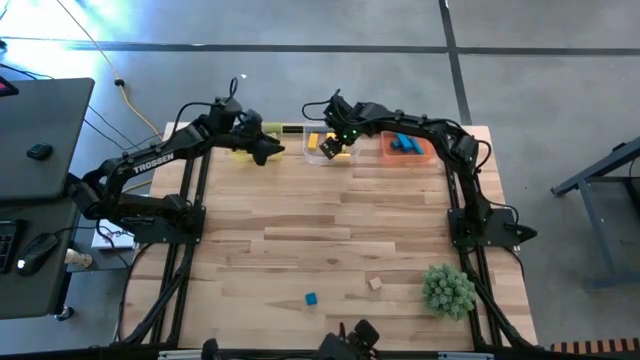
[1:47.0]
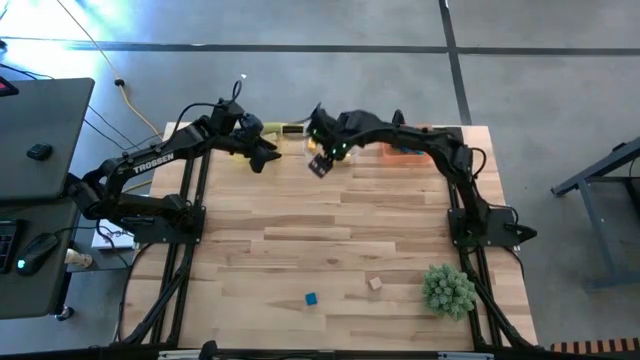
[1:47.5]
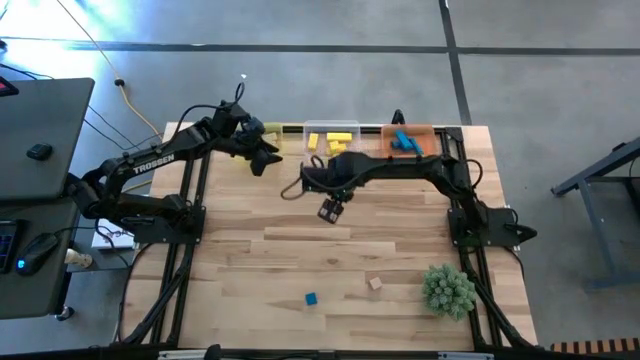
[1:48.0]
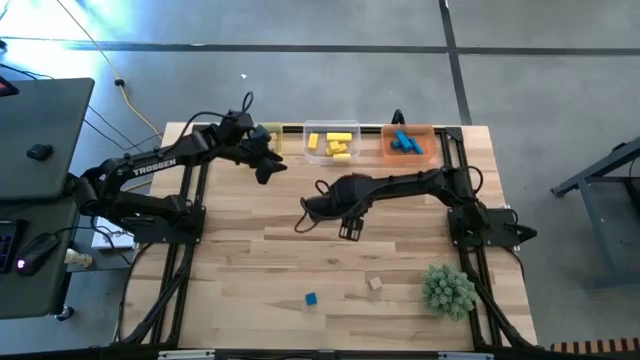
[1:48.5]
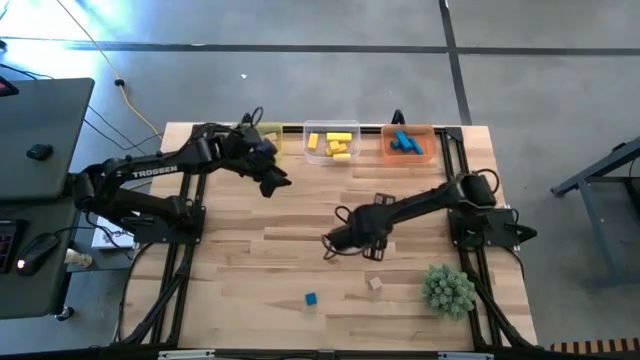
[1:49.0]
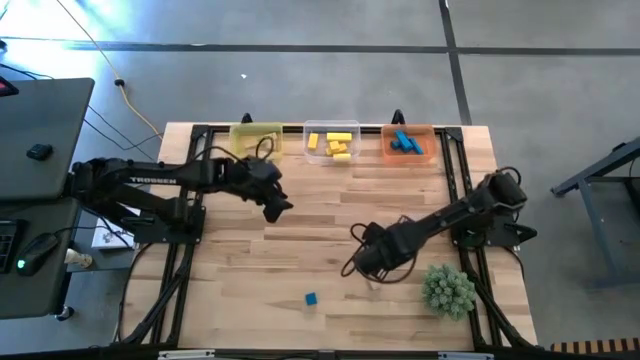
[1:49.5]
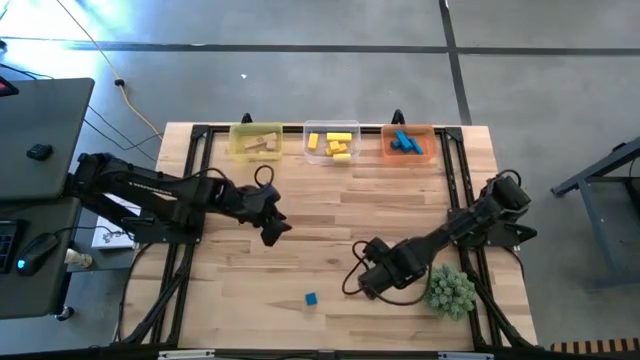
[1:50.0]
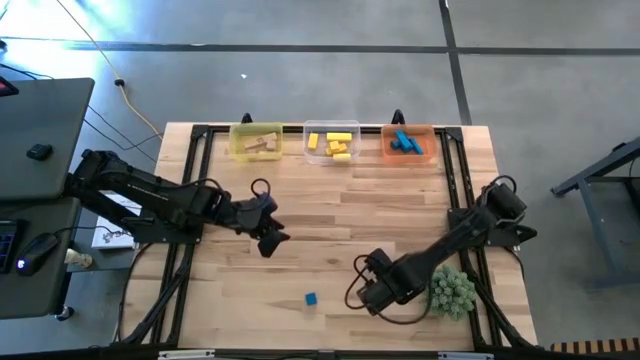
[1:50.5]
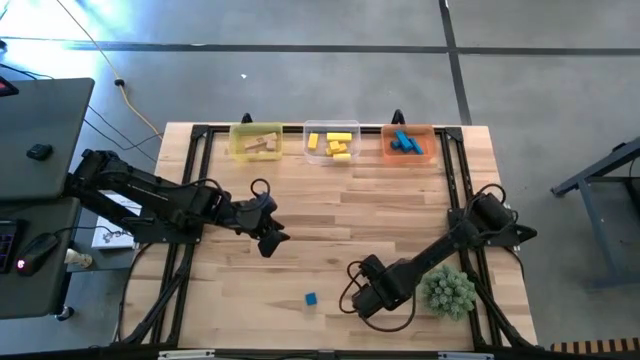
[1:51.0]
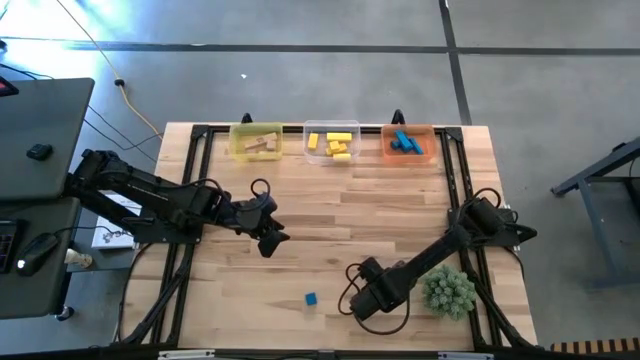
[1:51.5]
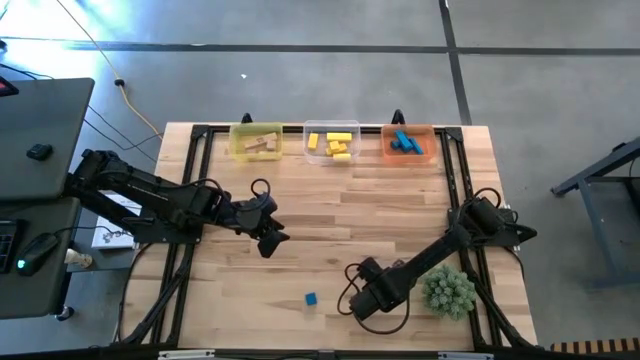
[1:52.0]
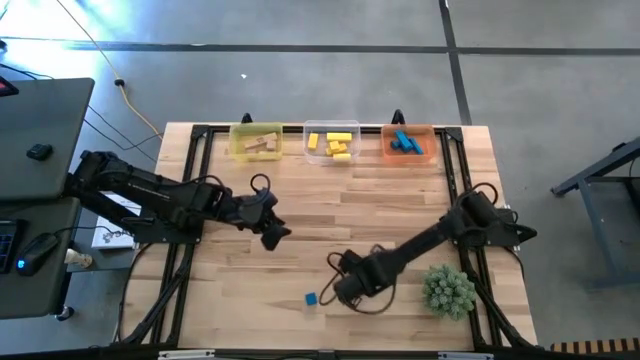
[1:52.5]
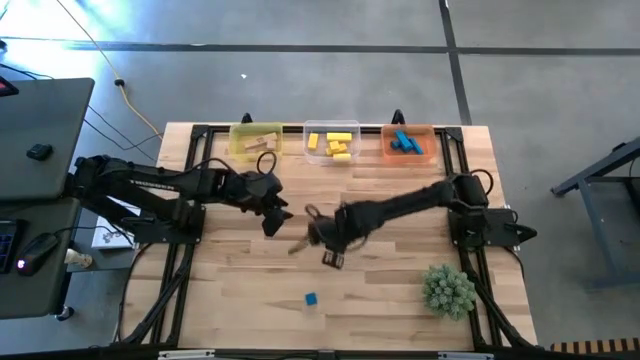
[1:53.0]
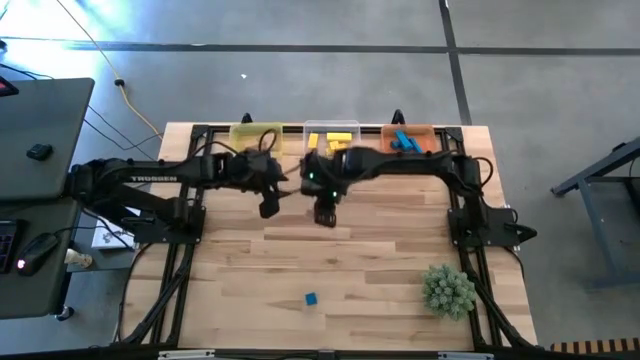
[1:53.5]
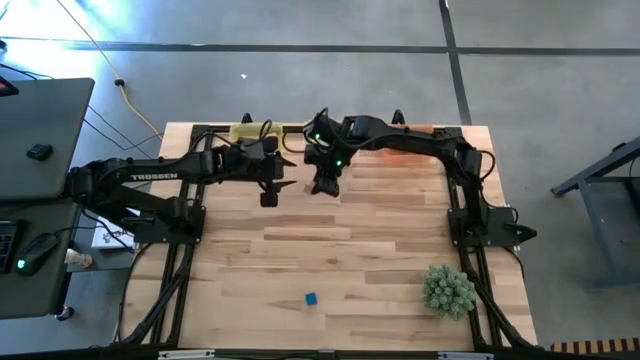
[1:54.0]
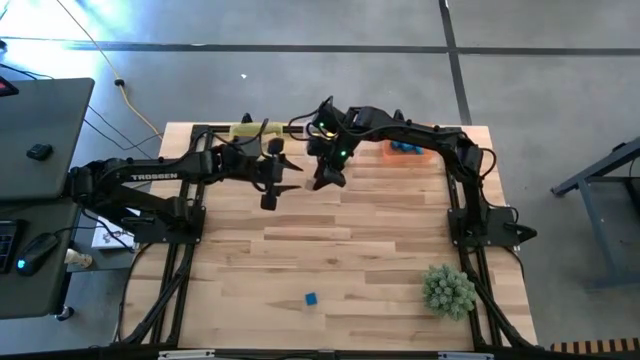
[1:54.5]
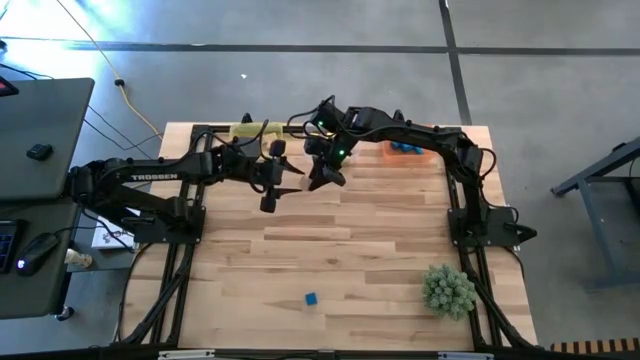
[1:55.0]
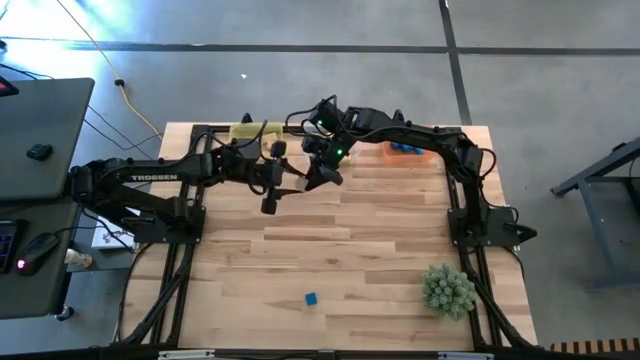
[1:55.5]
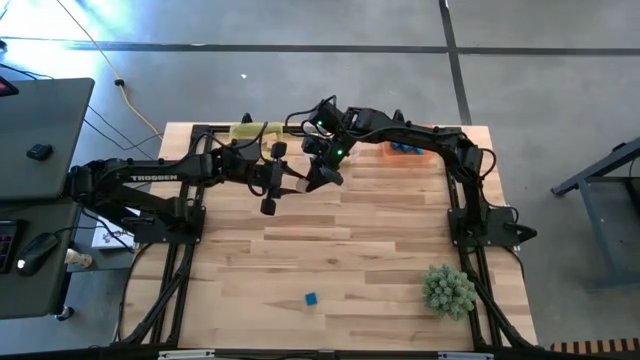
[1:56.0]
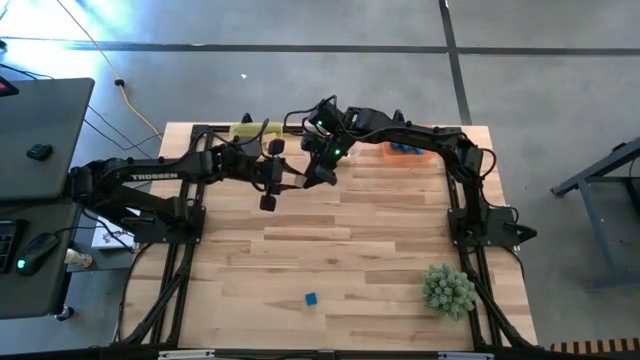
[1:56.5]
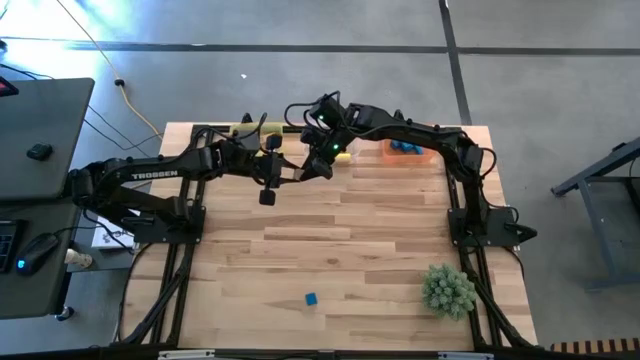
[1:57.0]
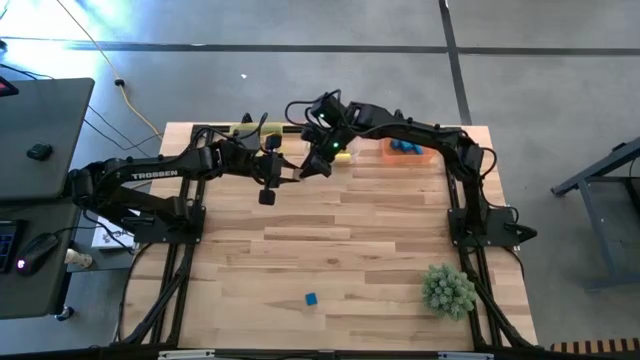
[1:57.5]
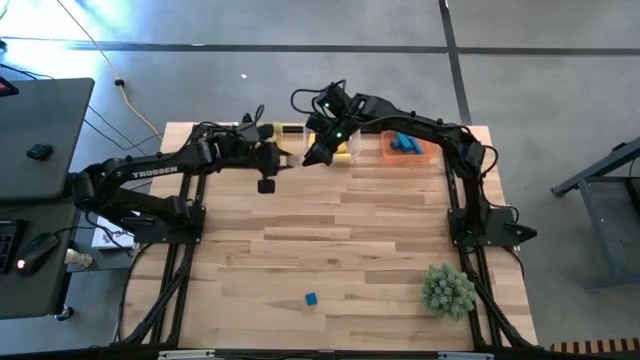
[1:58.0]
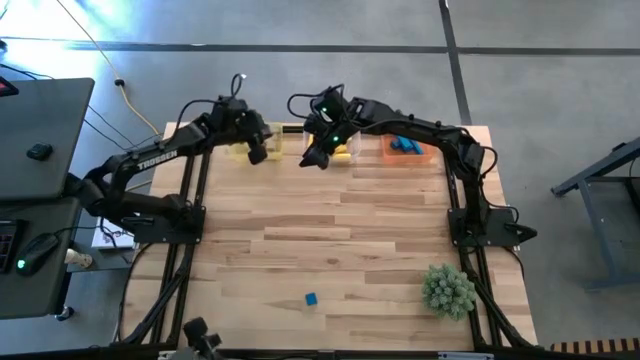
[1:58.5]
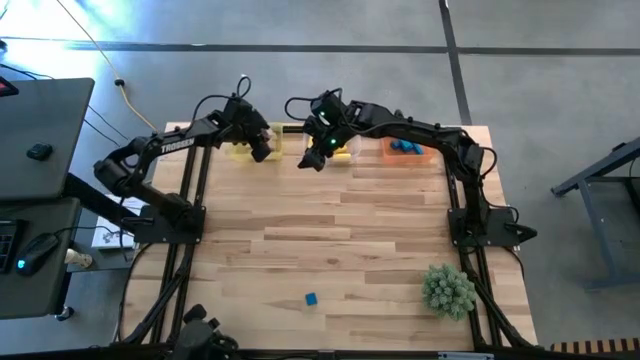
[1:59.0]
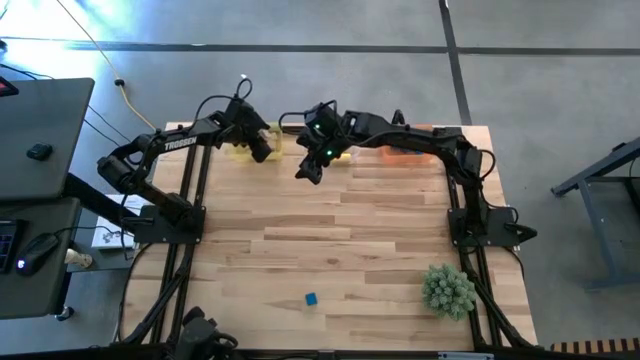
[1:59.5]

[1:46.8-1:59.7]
Task: Sort & place blocks by color
Put the brown block into the yellow bin

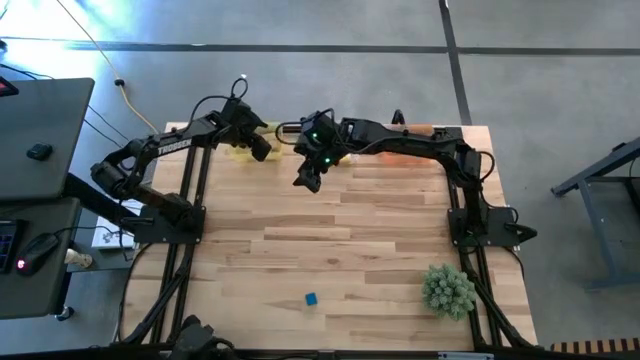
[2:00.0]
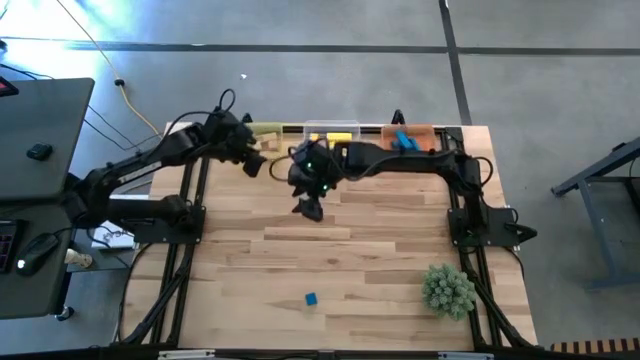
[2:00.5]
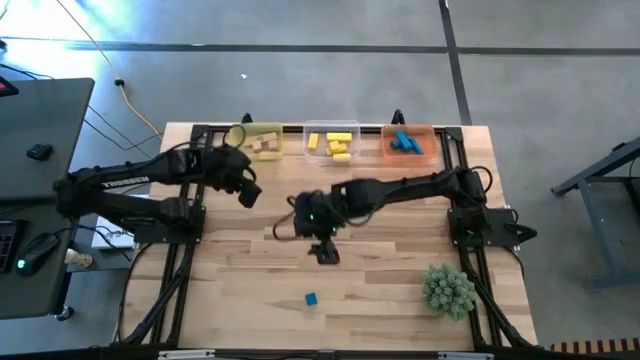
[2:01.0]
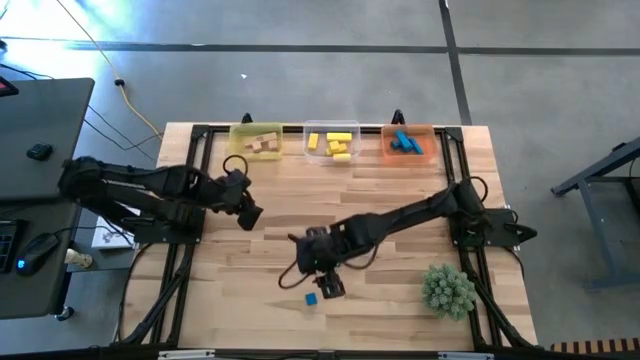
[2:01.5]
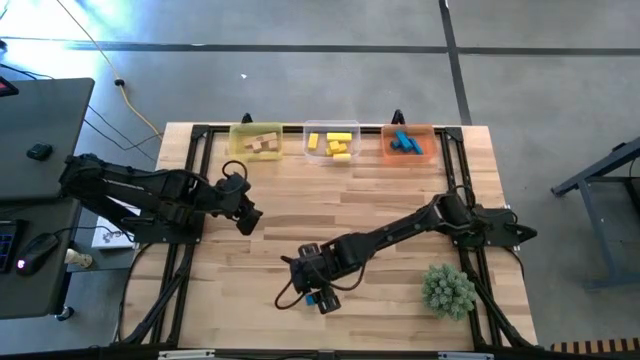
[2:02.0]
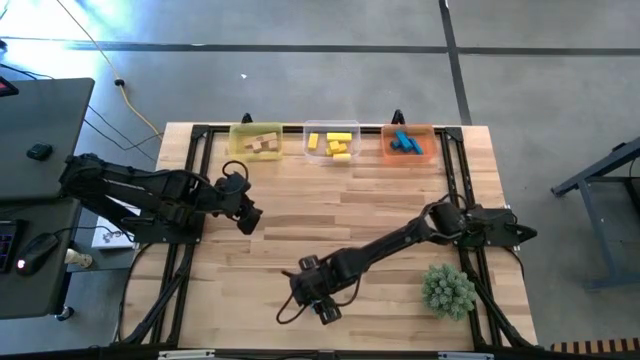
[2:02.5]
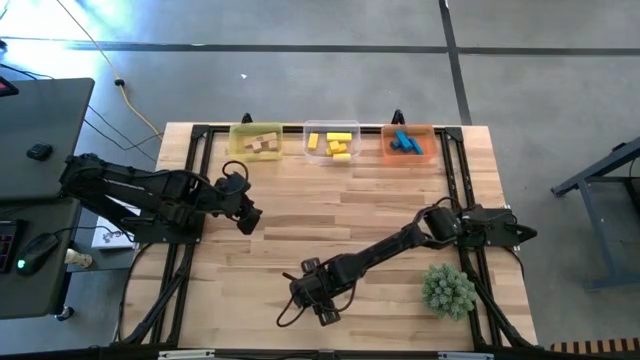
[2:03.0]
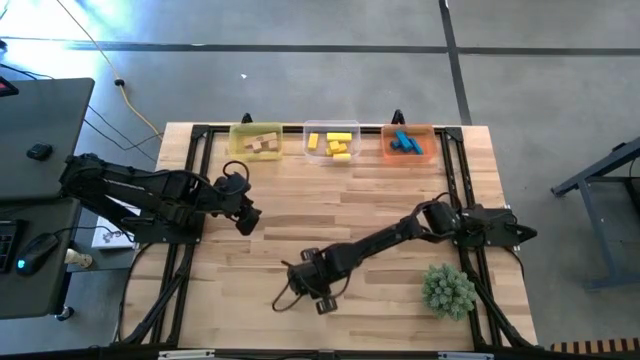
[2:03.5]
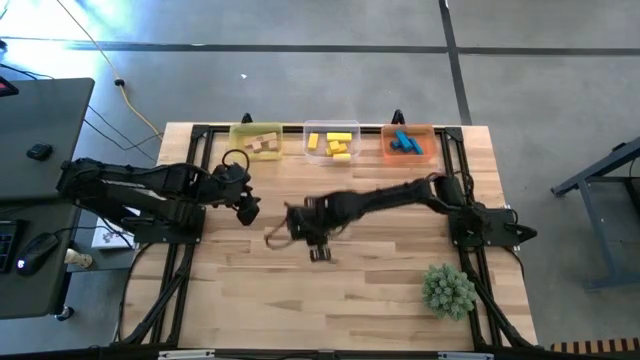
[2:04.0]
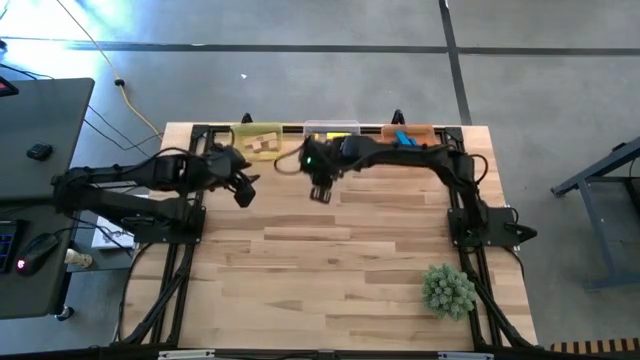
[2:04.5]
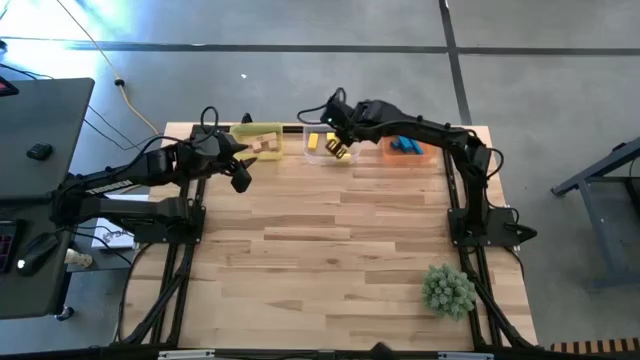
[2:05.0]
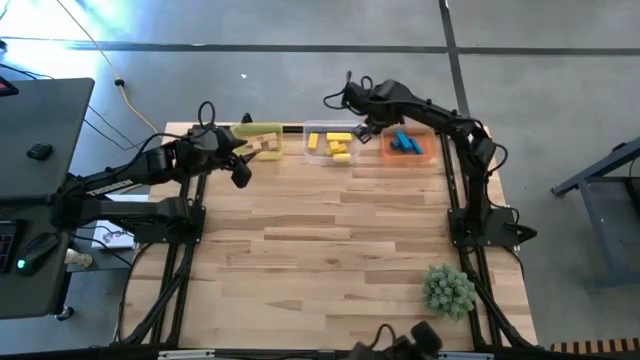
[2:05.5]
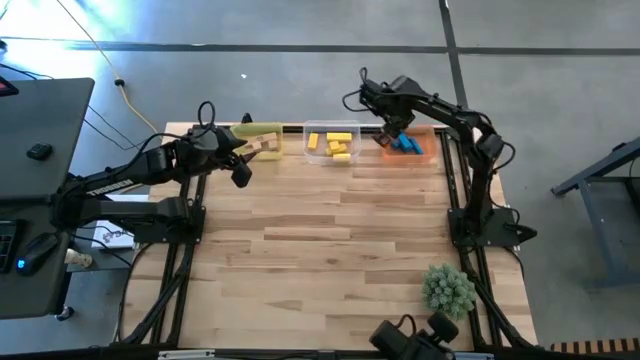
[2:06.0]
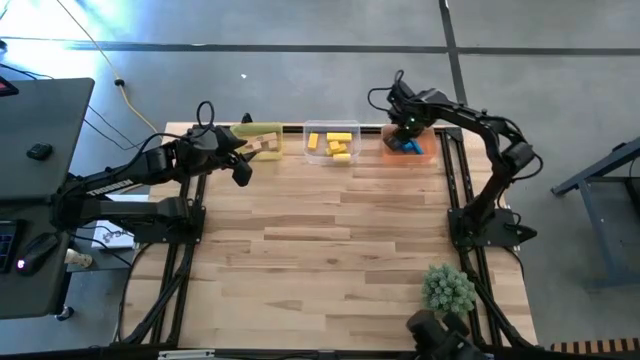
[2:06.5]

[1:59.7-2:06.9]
Put the blue block into the orange bin

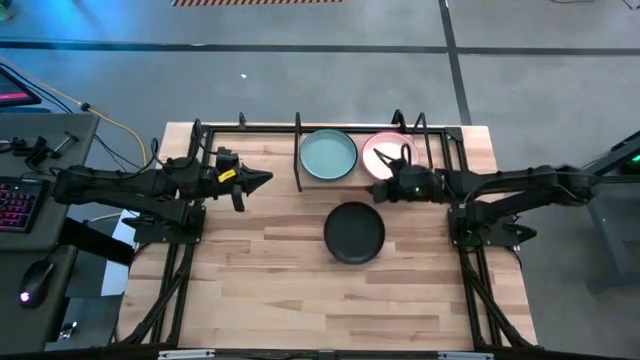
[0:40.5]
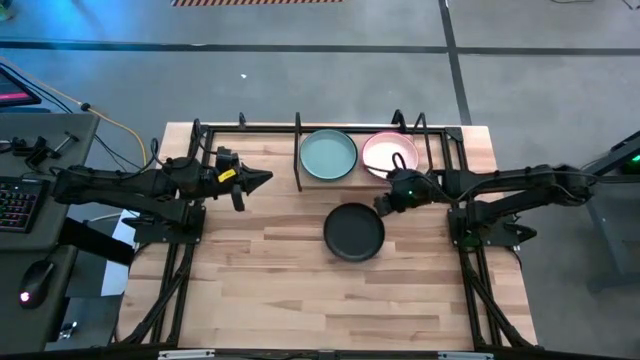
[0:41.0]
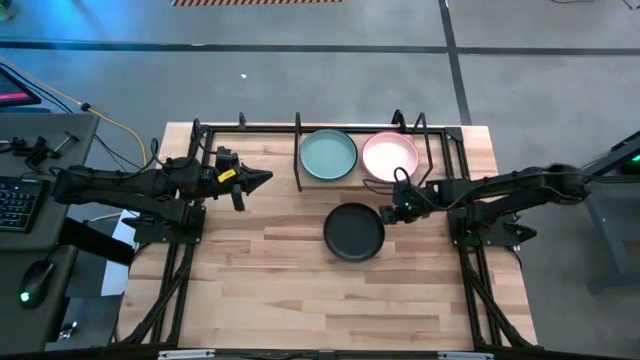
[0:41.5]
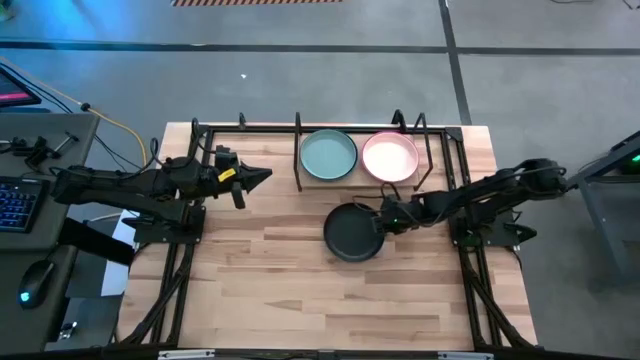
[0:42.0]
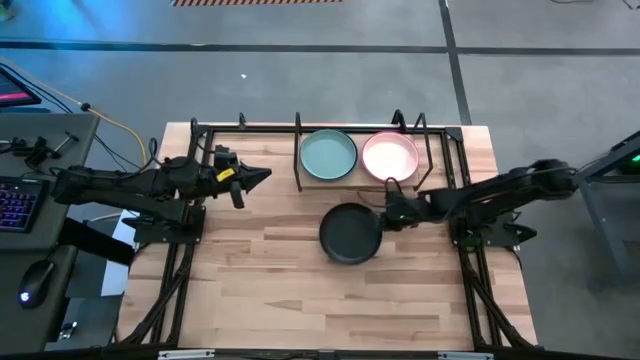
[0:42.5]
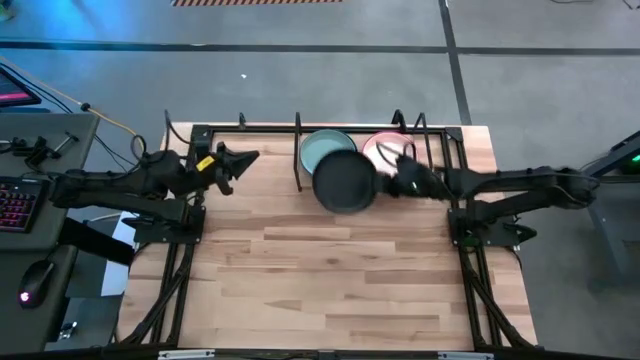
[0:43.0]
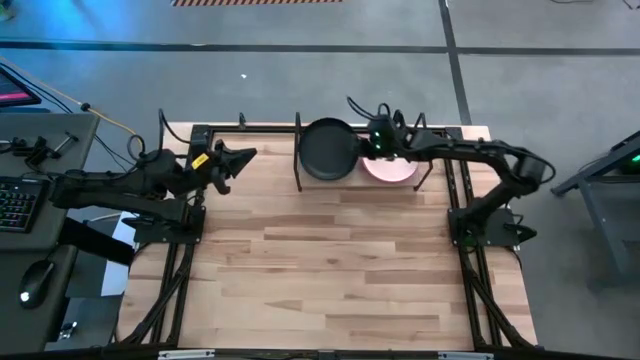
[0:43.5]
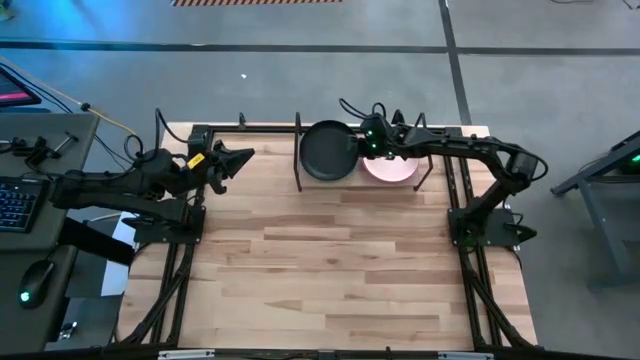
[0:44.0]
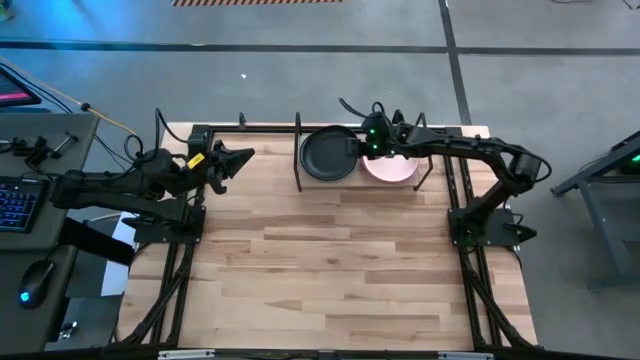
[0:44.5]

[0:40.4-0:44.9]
Task: Place and stack plates onto a shelf
Stack the black plate on top of the grey plate
